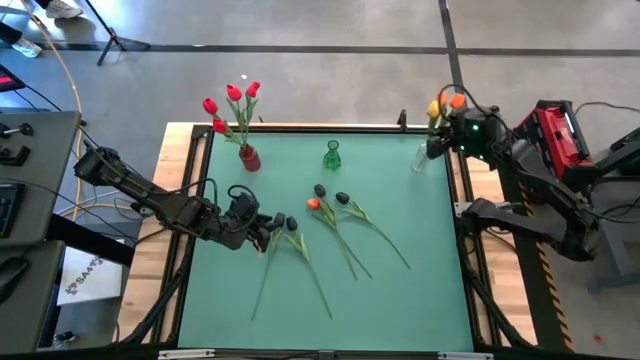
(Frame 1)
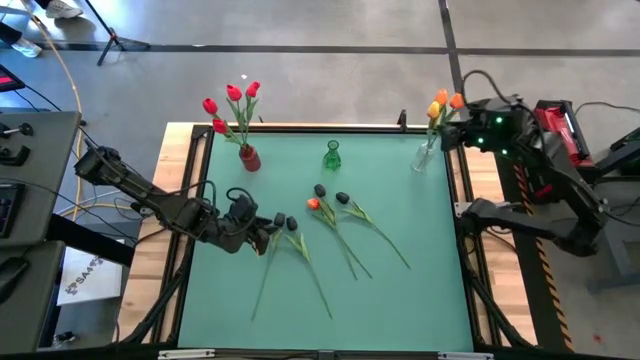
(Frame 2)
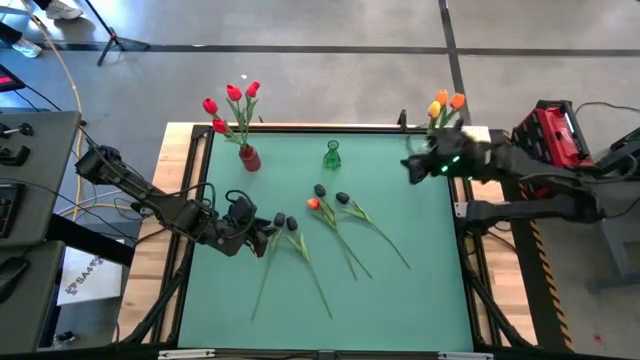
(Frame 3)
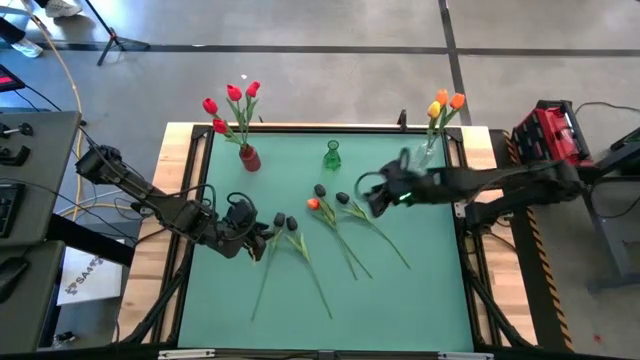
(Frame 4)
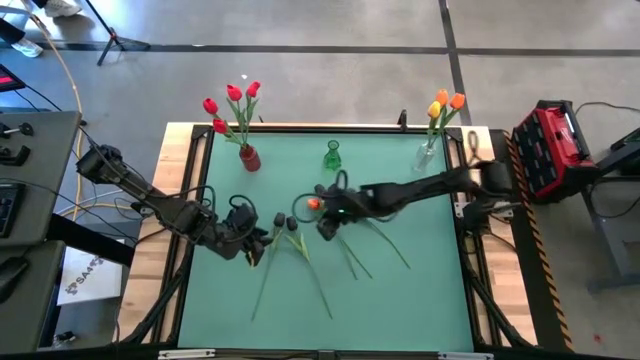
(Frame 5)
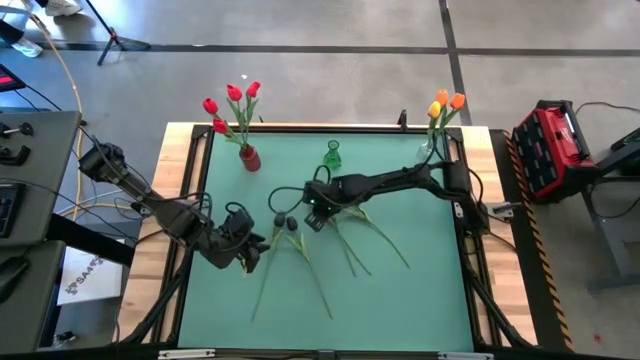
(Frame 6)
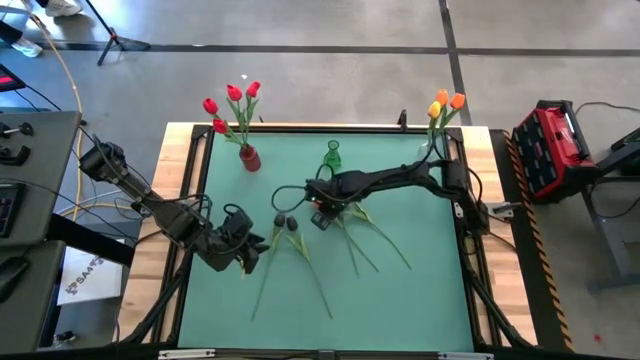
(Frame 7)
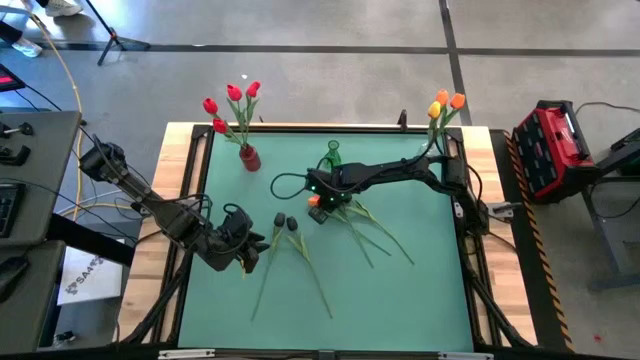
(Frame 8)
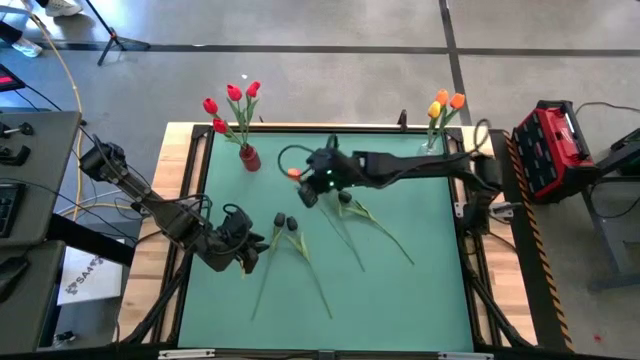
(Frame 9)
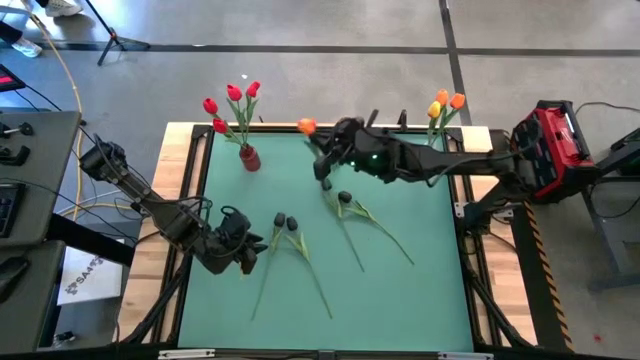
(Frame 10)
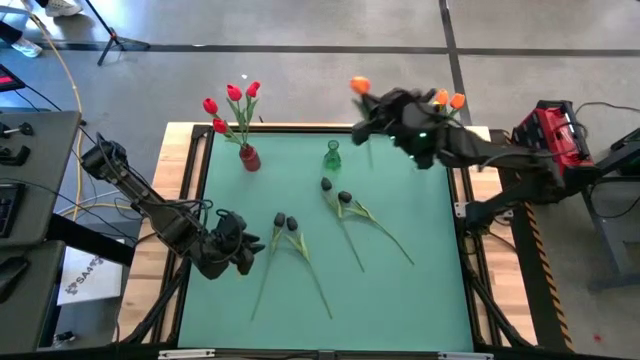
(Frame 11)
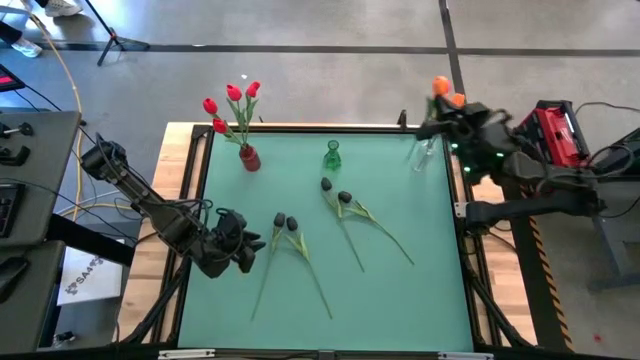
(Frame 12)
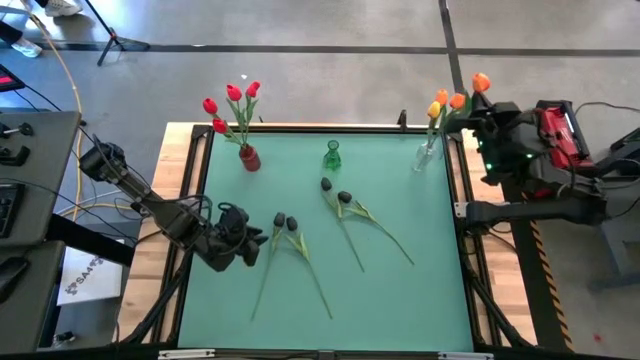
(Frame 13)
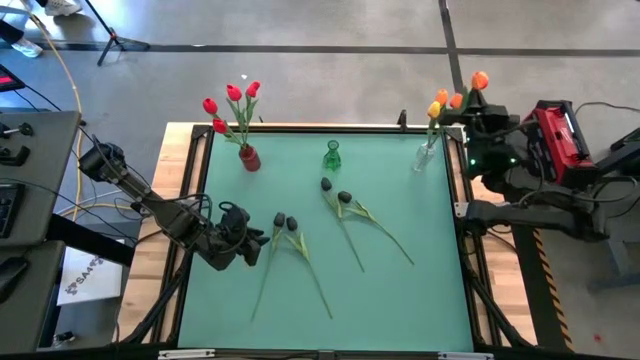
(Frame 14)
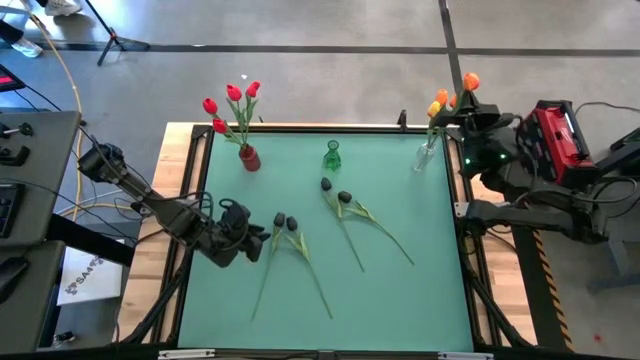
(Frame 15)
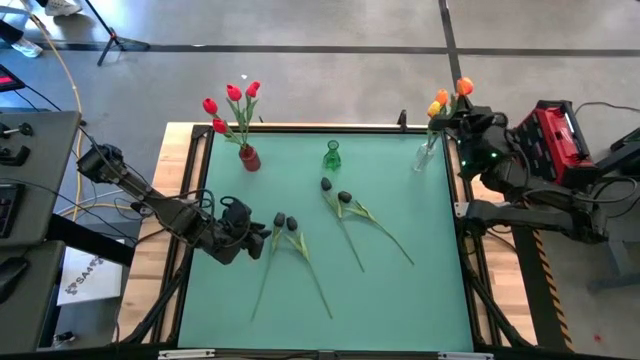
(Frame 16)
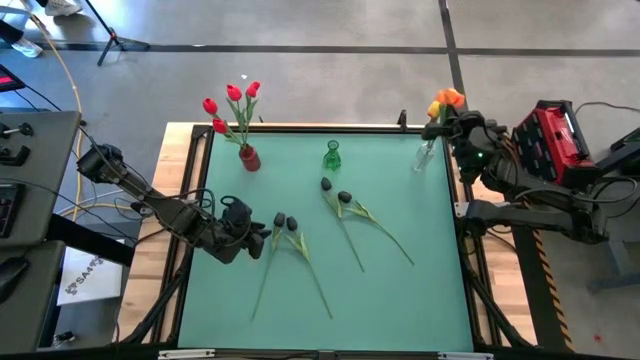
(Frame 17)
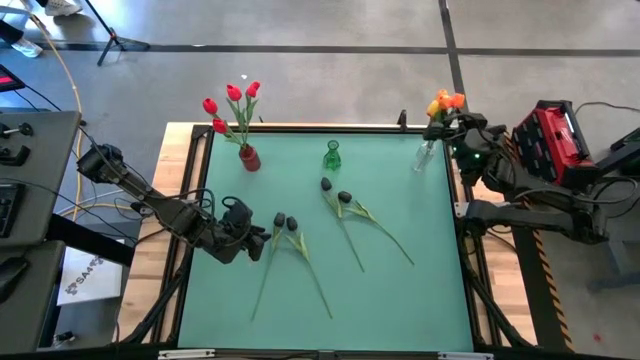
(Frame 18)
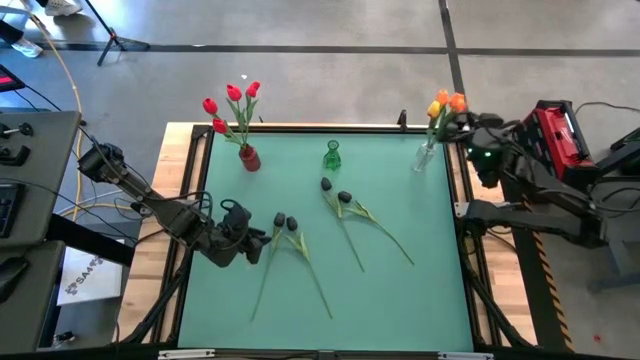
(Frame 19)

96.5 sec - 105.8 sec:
Task: Sort flowers into vase by color
Put the orange tulip into the transparent vase

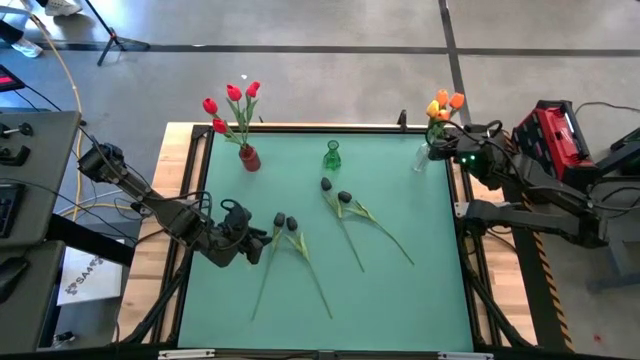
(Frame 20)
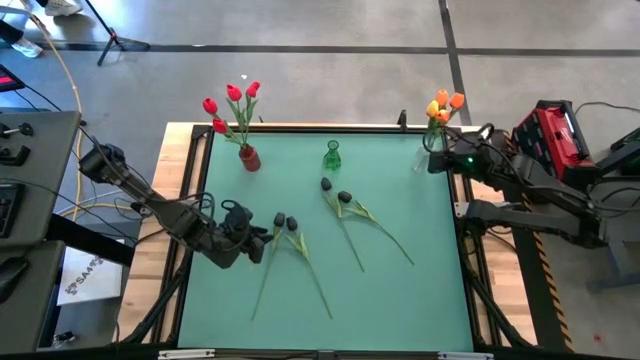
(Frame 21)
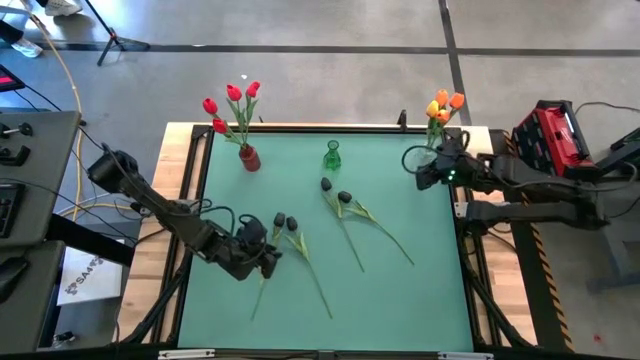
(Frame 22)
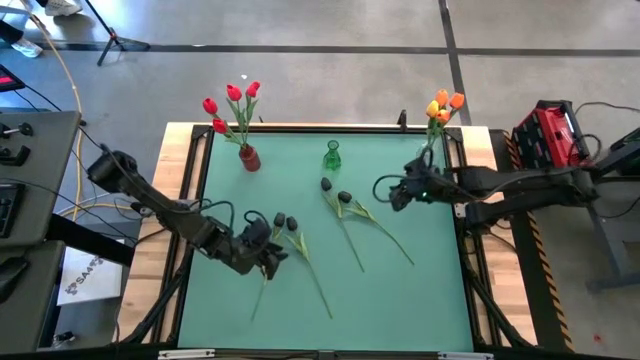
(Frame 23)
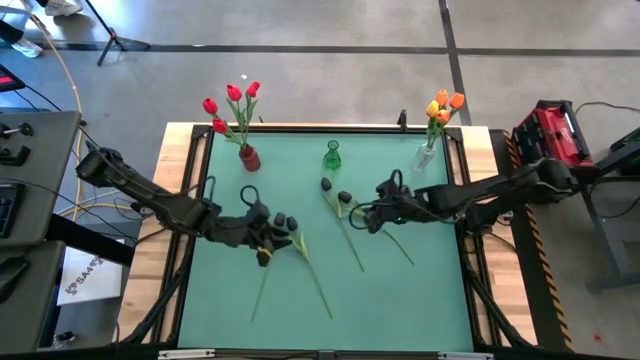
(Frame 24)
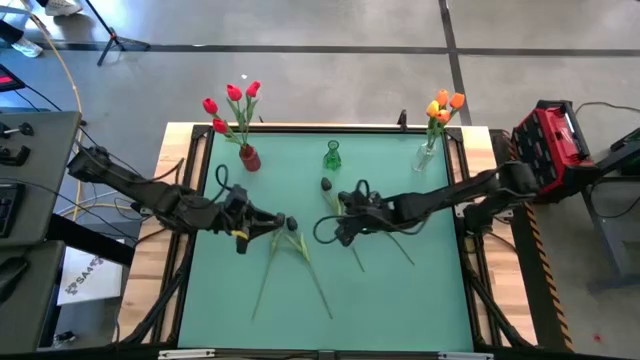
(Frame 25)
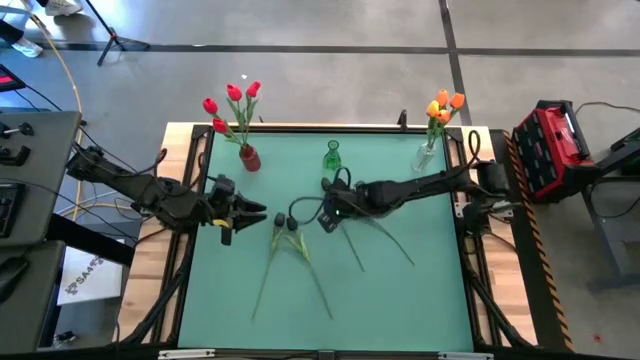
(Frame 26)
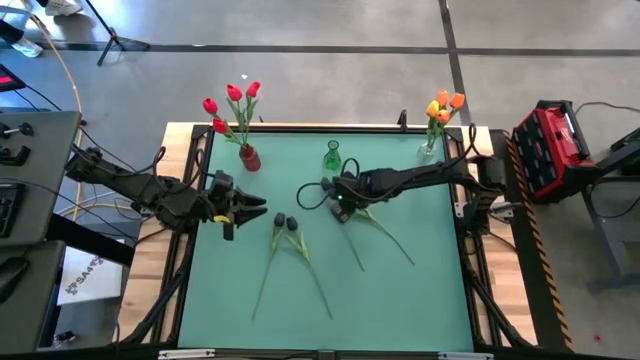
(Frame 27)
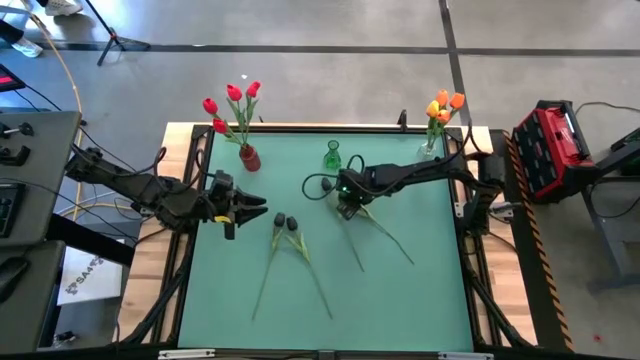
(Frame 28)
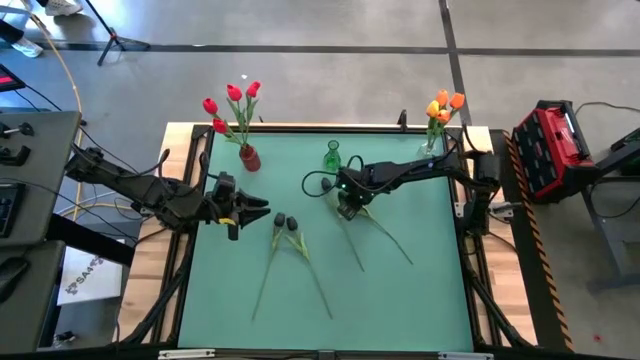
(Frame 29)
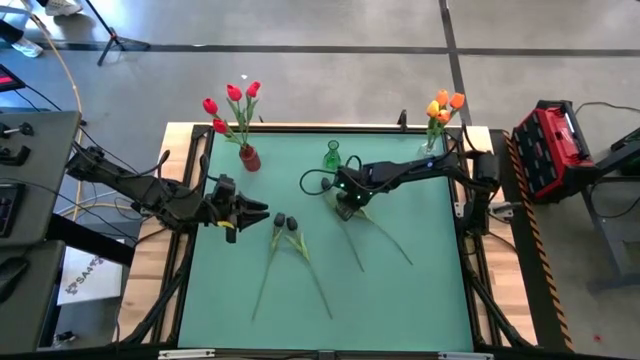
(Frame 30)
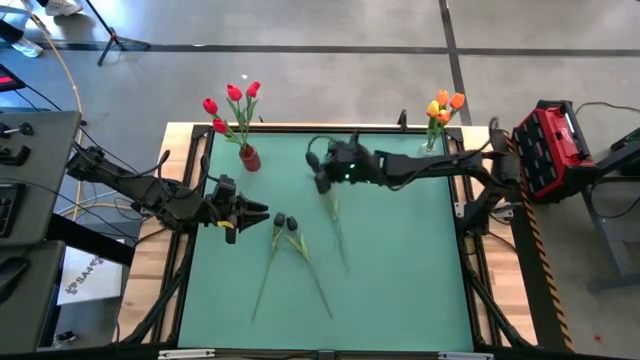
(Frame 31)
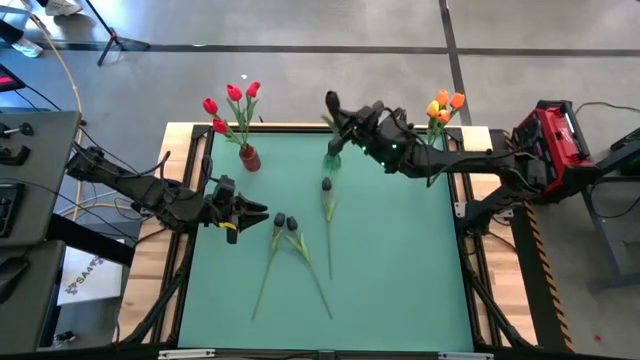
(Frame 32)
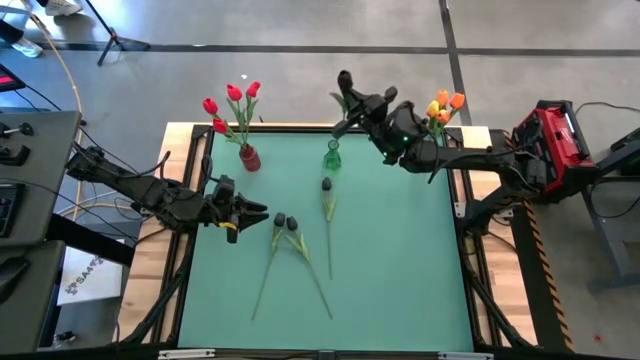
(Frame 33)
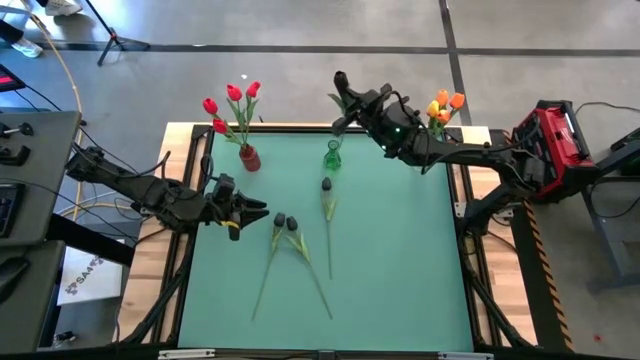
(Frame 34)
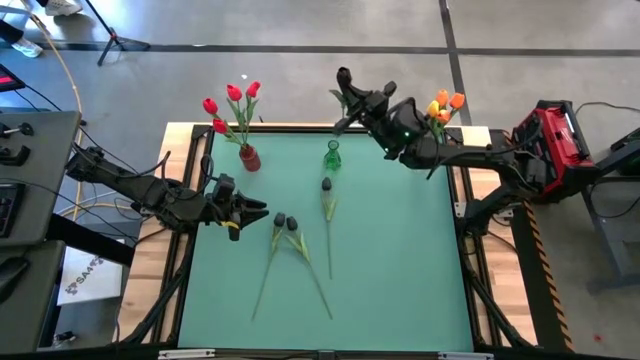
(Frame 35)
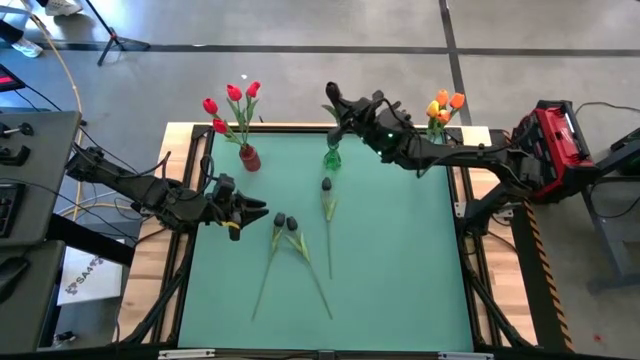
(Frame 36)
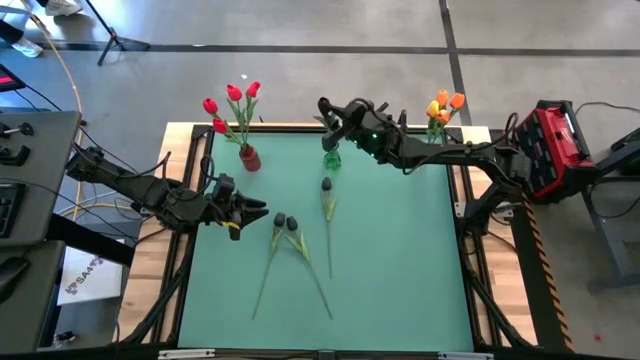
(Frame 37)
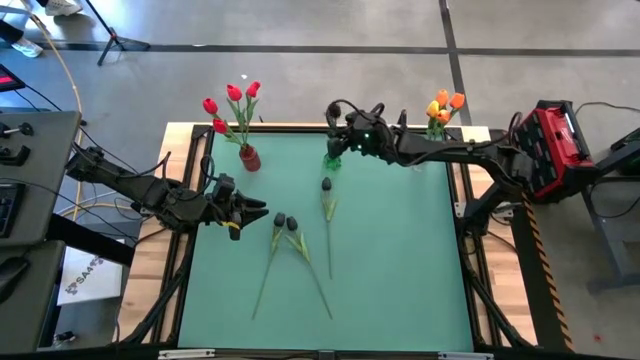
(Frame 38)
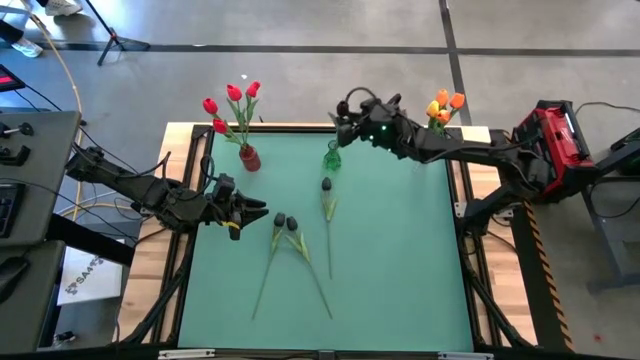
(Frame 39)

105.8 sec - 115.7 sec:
Put the black tulip into the green vase

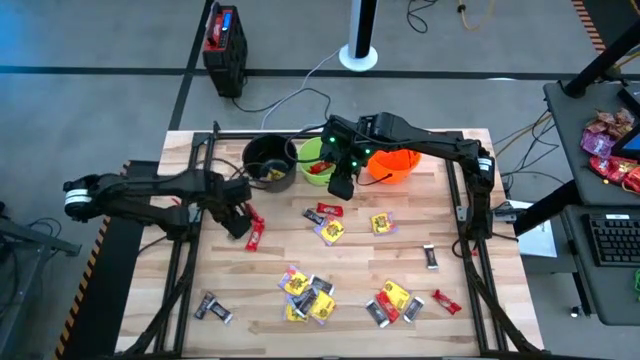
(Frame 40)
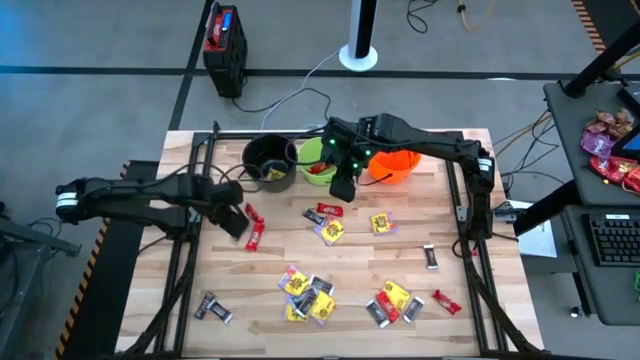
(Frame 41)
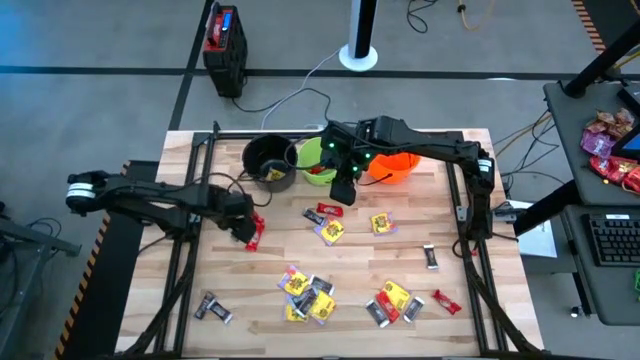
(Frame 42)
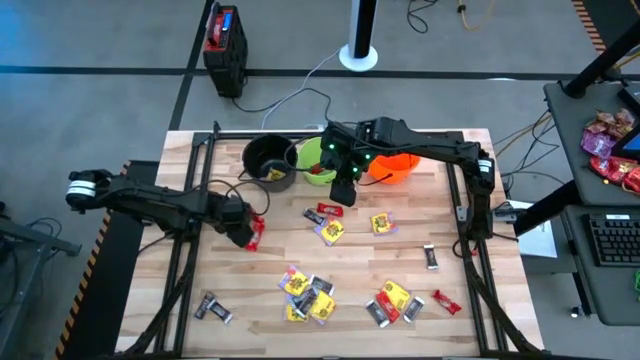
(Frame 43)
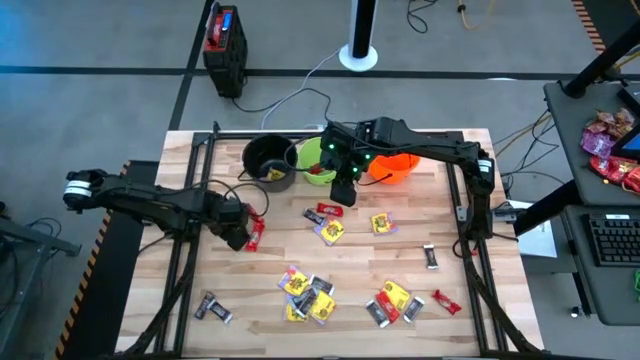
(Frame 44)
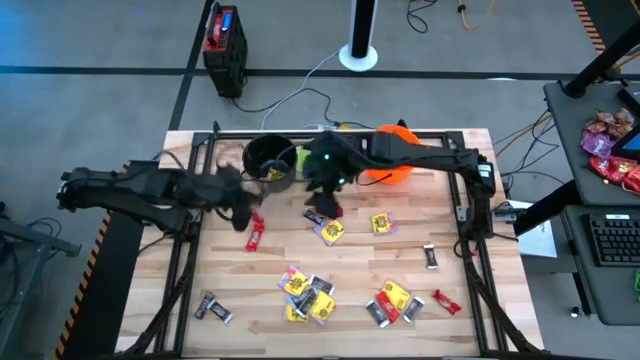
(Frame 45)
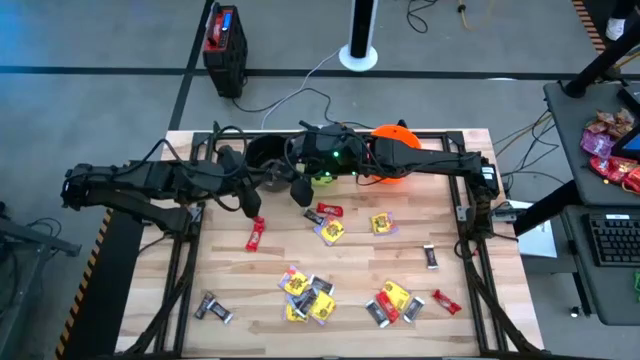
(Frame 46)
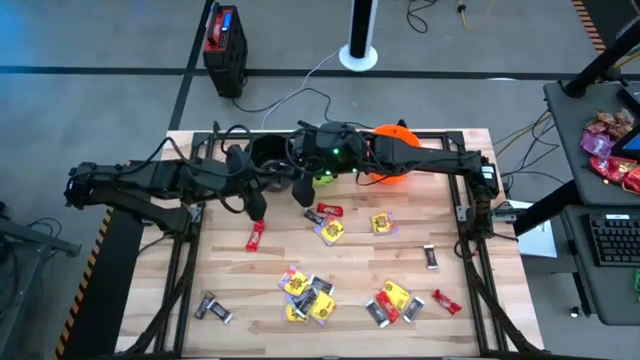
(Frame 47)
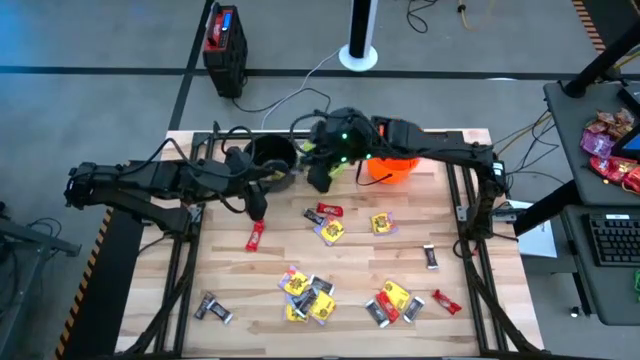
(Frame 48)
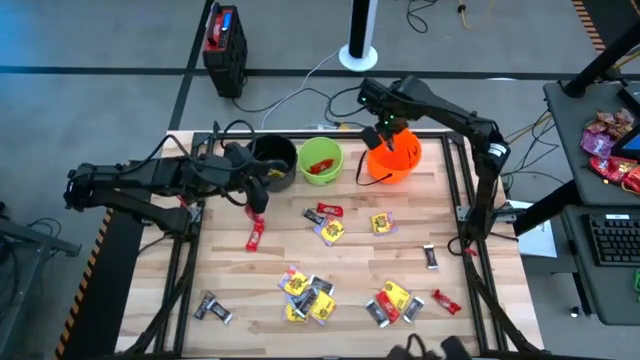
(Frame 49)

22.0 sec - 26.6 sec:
Task: Sort candy by brand, put in halloween buckets
Put the brown chocolate bar into the orange bucket
